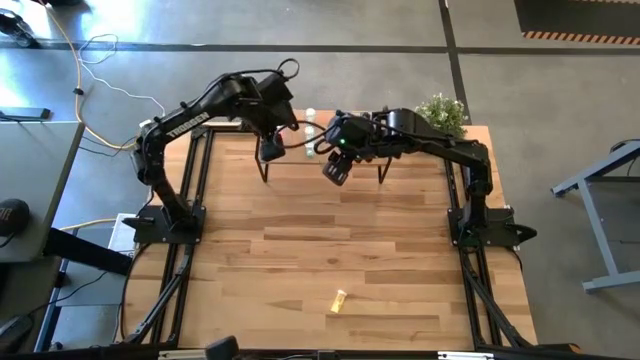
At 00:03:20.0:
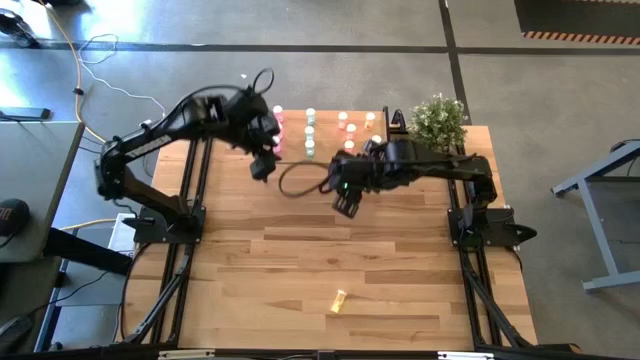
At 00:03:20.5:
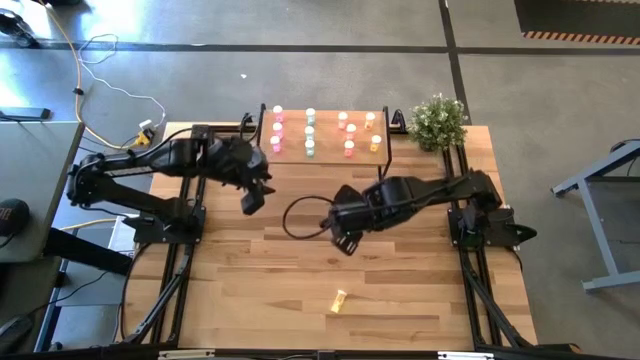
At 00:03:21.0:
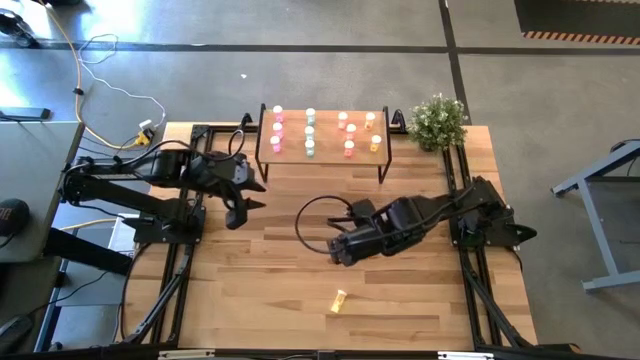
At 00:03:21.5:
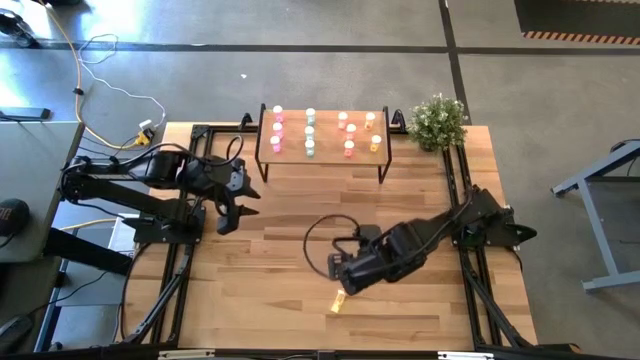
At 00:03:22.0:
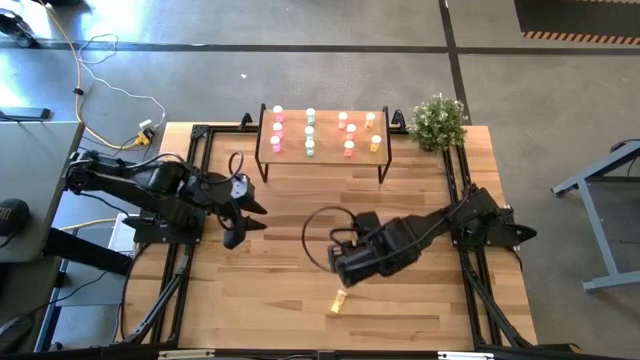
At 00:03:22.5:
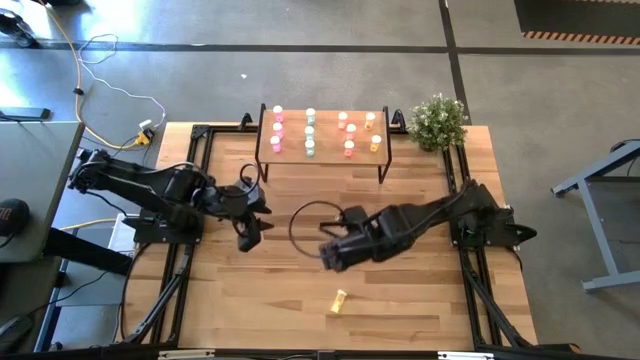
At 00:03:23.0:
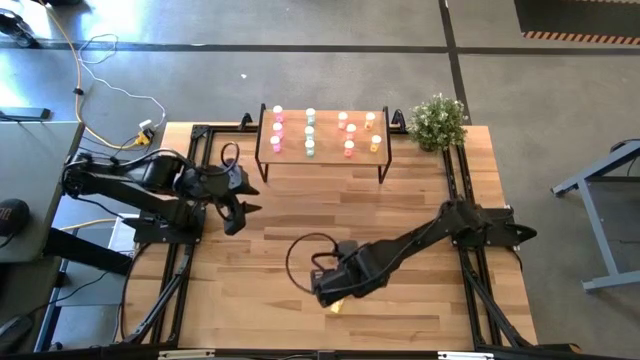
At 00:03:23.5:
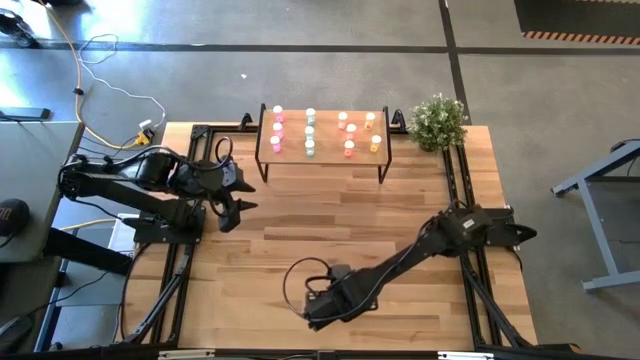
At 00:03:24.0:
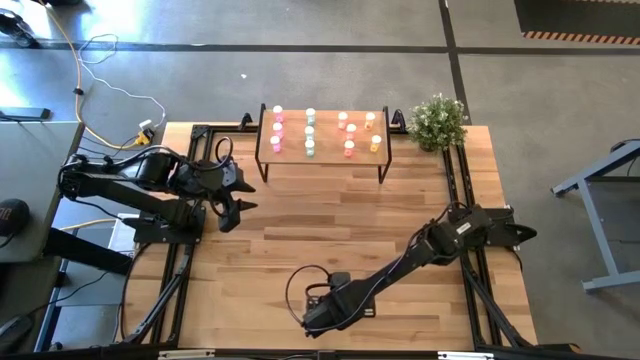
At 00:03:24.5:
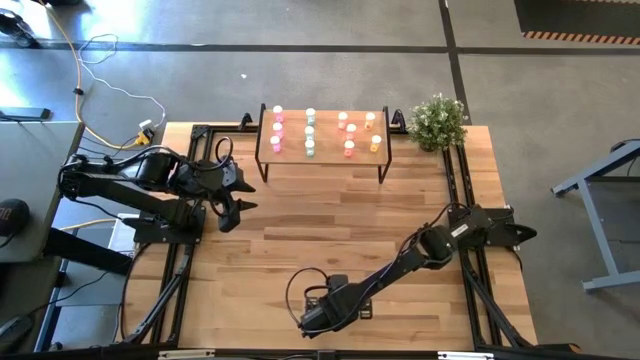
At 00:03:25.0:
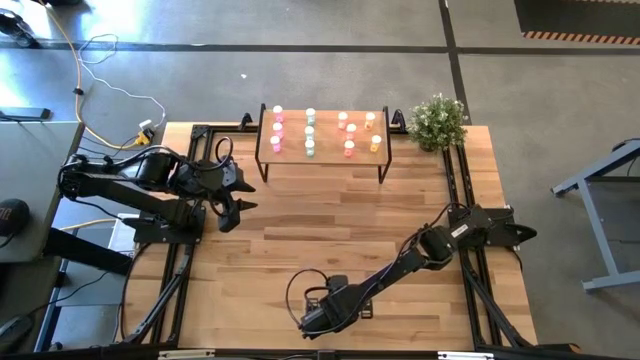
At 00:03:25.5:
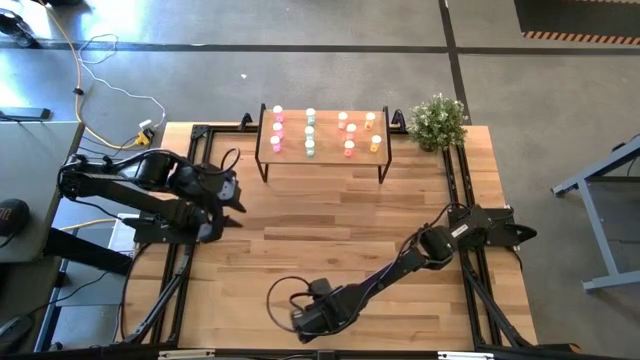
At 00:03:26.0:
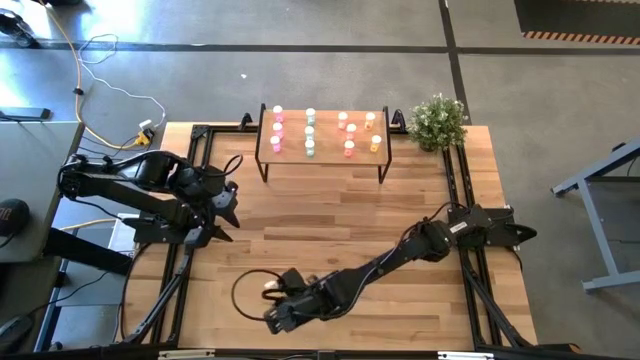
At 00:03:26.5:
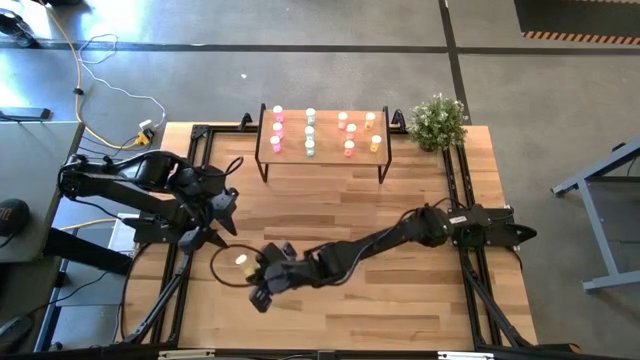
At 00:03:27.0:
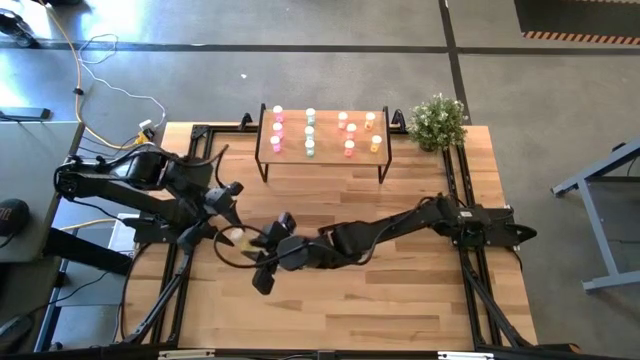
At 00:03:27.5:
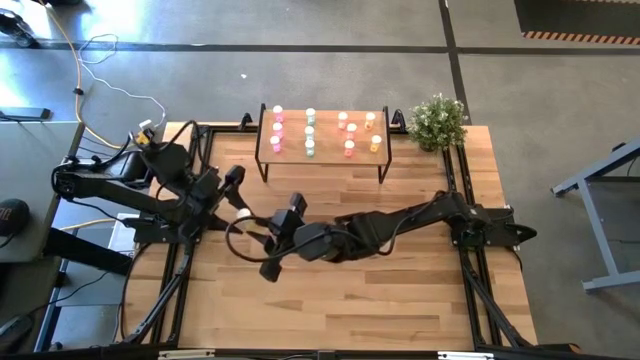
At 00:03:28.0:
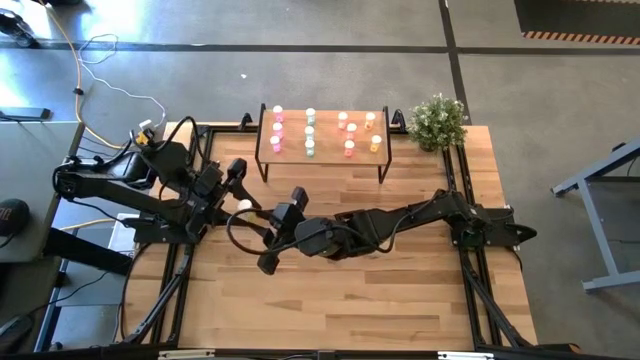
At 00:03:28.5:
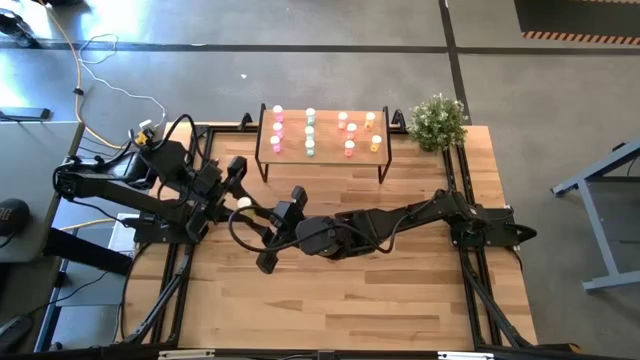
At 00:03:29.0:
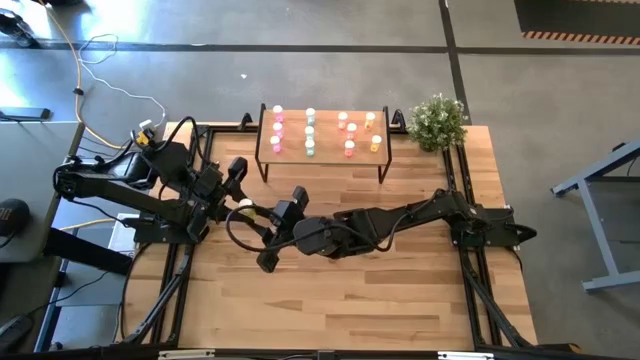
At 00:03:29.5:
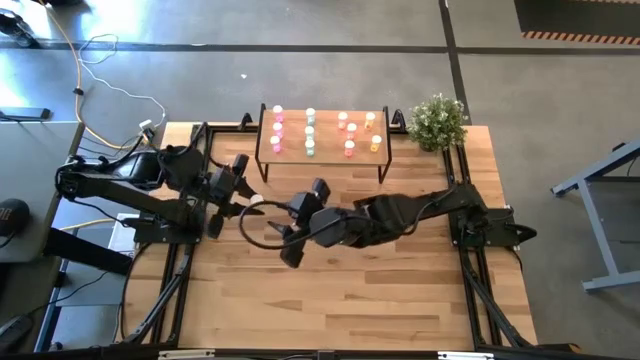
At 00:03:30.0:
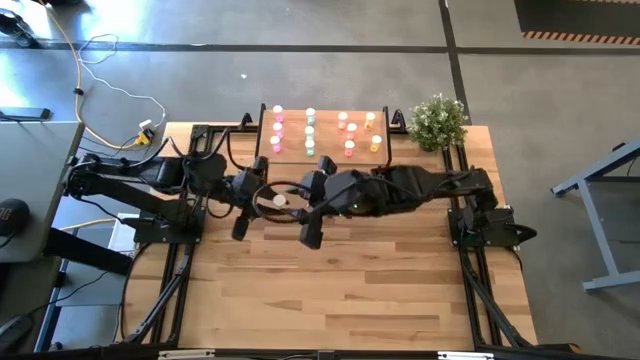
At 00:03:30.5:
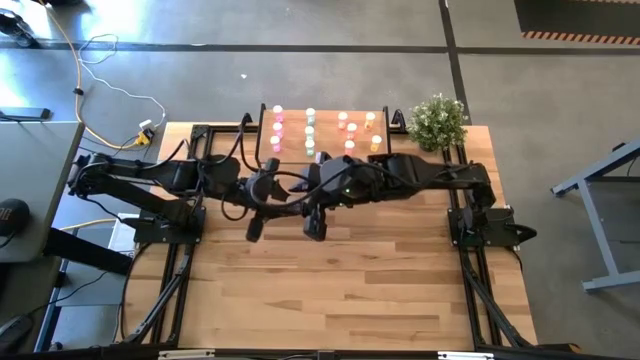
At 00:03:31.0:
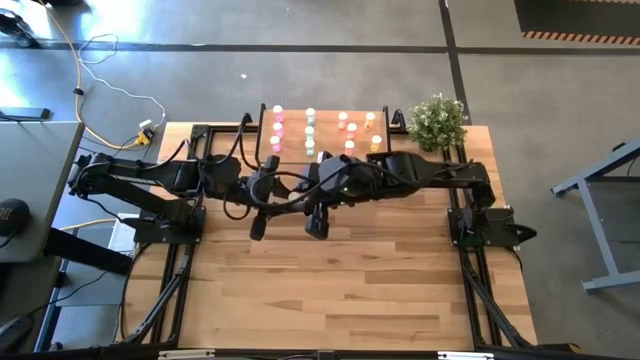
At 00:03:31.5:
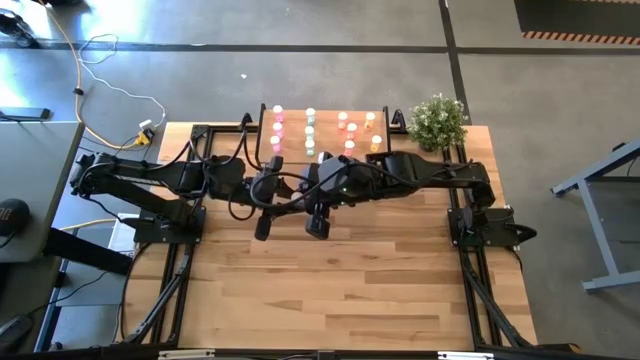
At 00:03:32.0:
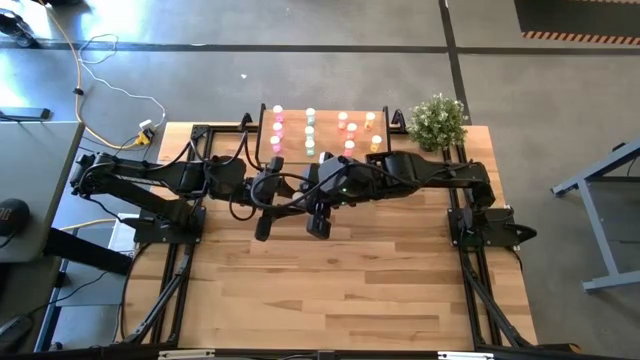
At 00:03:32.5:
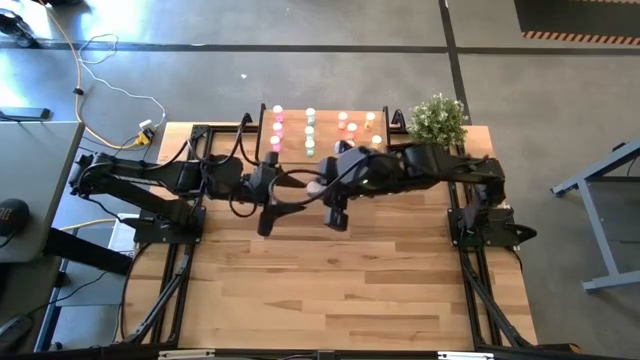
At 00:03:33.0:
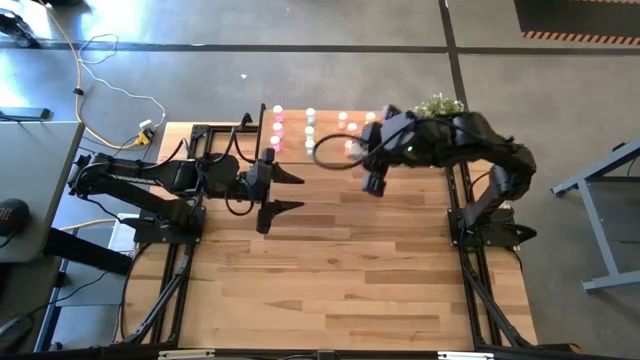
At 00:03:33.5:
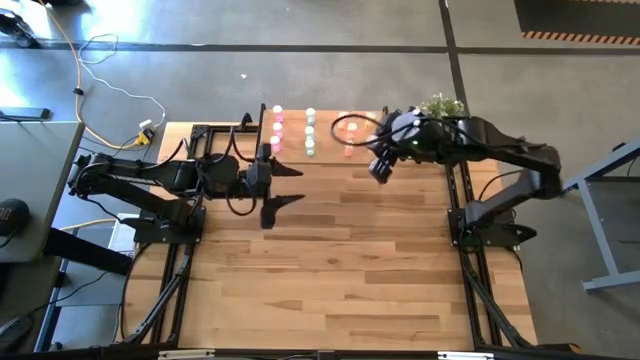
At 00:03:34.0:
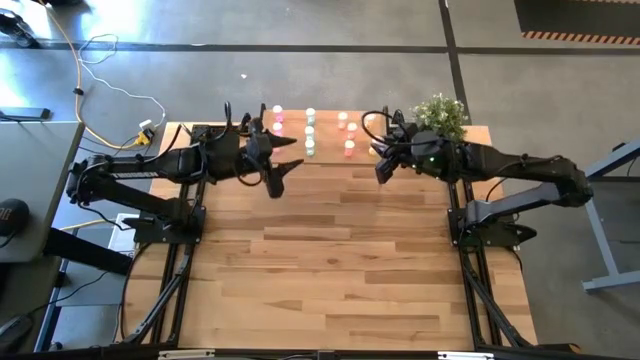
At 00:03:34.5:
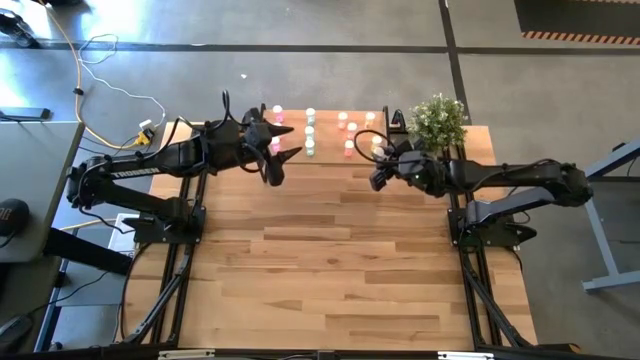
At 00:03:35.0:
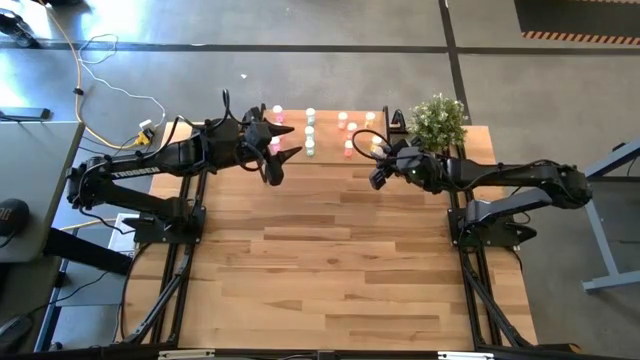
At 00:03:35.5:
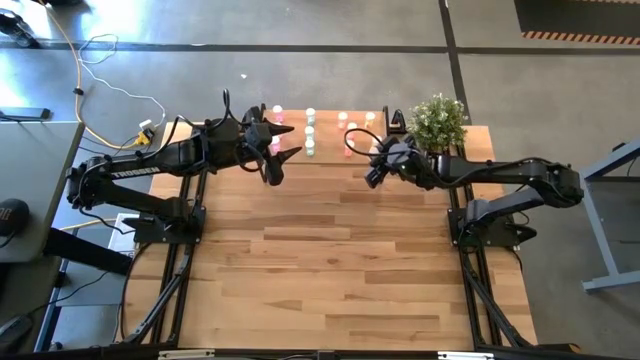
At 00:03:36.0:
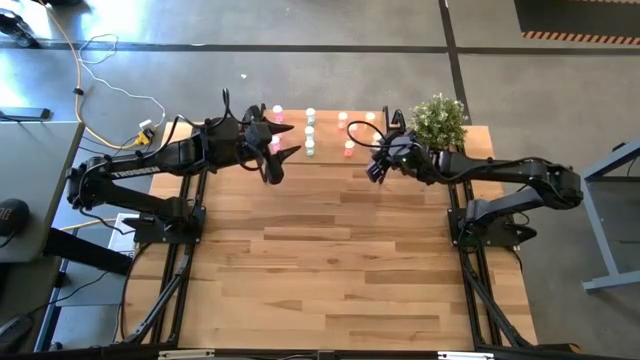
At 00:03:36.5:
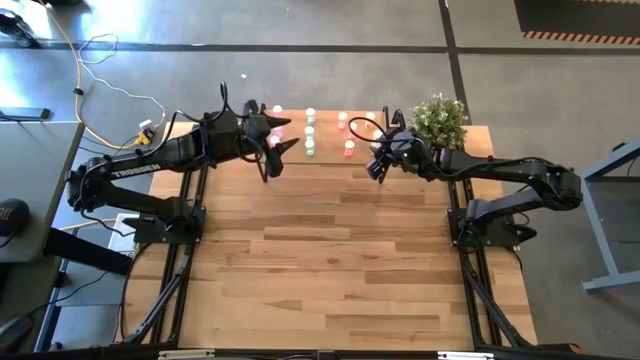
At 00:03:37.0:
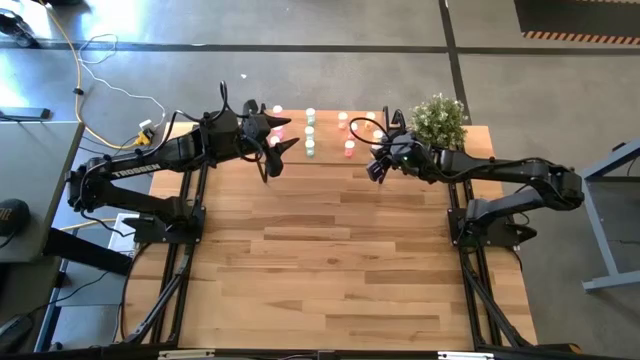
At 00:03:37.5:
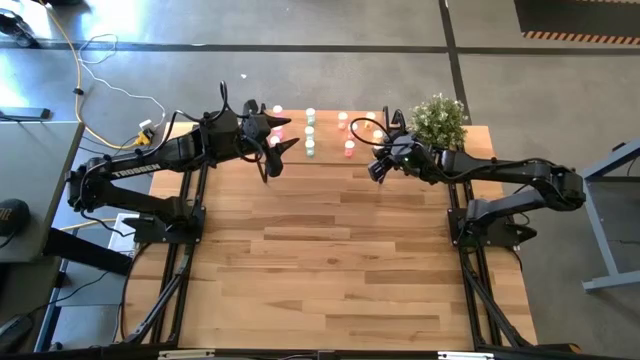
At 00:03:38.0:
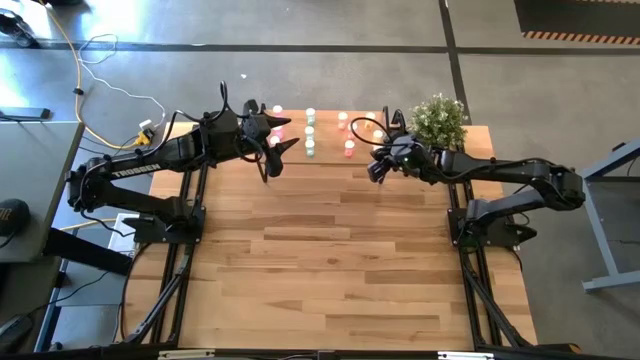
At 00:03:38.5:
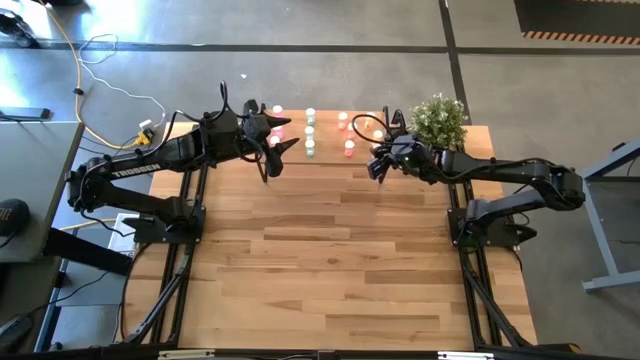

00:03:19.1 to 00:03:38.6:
Task: Pick and place medicine bottles onto shelf by color
Put the yellow pill bottle on the shelf aligned with the other yellow pill bottles
